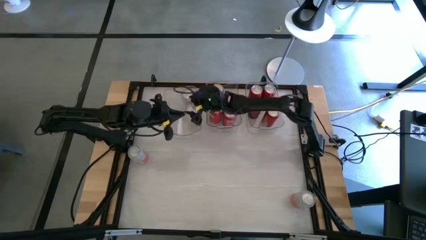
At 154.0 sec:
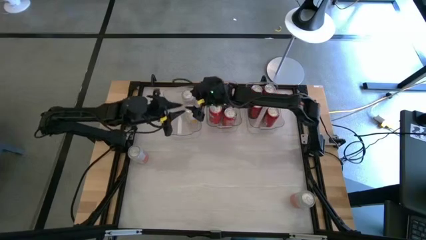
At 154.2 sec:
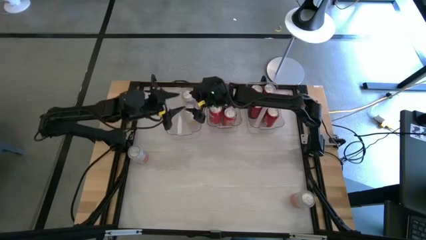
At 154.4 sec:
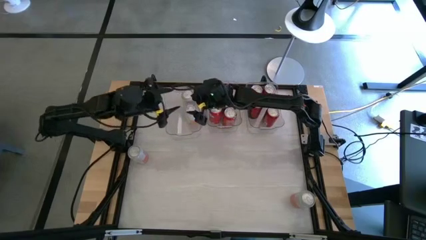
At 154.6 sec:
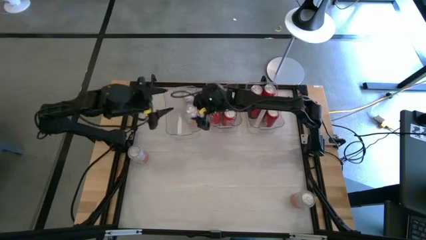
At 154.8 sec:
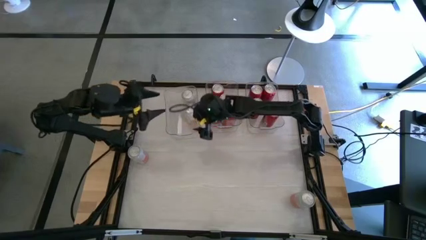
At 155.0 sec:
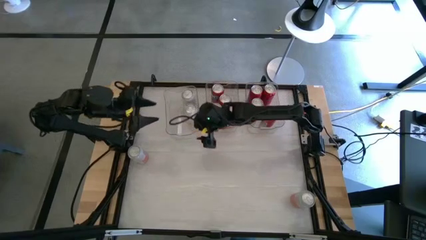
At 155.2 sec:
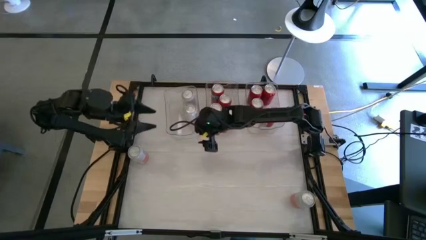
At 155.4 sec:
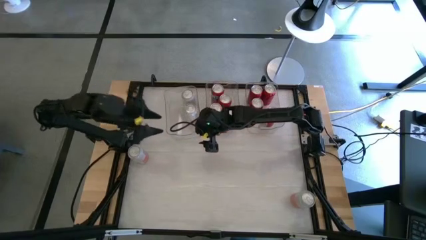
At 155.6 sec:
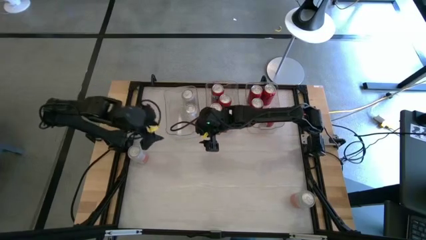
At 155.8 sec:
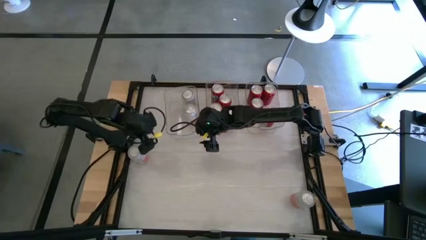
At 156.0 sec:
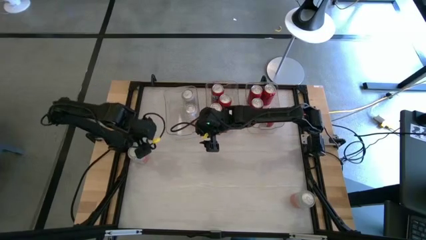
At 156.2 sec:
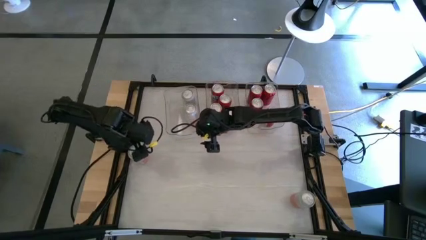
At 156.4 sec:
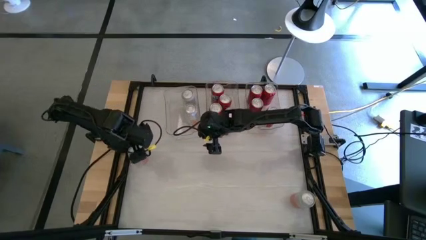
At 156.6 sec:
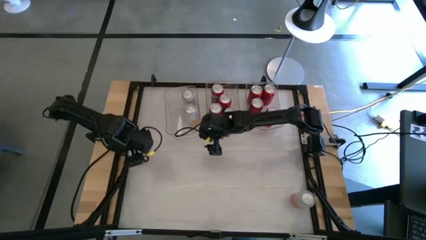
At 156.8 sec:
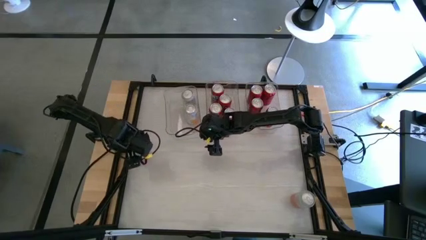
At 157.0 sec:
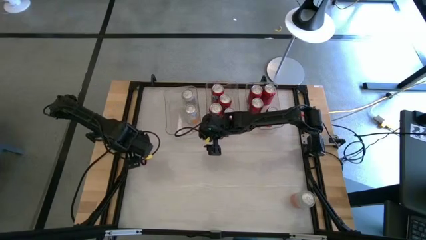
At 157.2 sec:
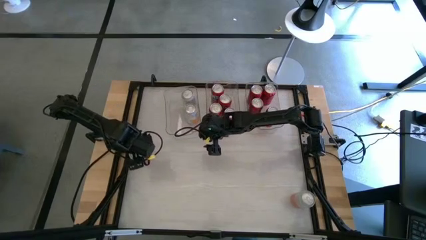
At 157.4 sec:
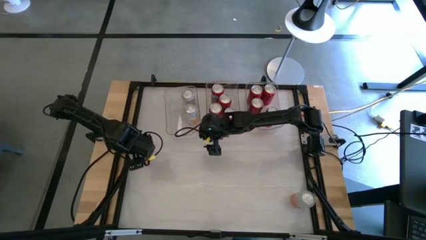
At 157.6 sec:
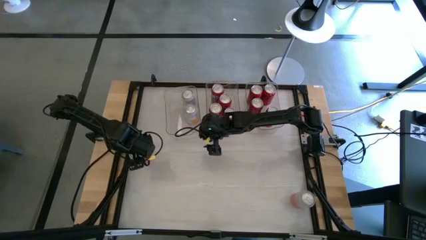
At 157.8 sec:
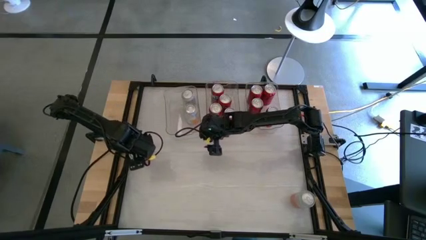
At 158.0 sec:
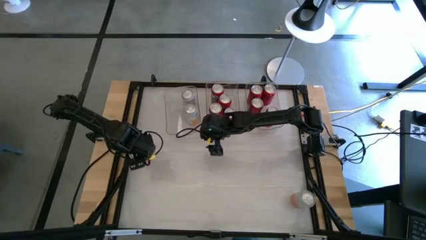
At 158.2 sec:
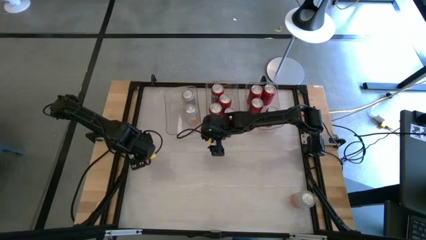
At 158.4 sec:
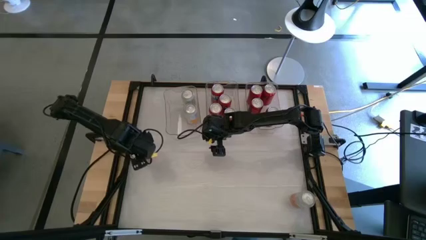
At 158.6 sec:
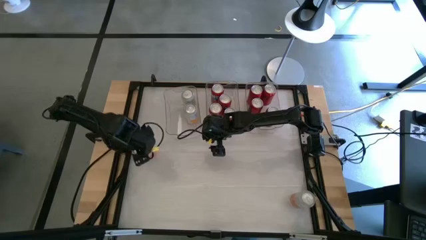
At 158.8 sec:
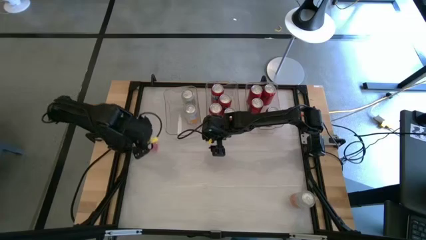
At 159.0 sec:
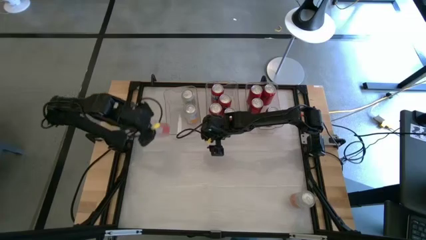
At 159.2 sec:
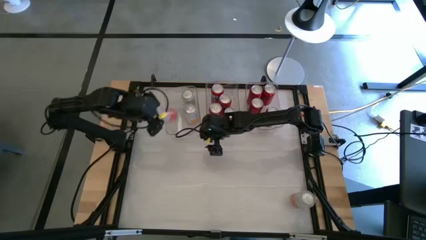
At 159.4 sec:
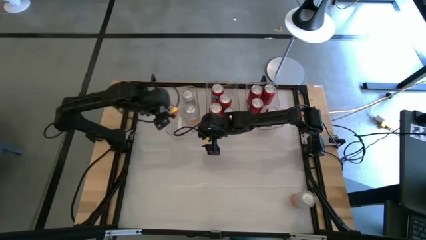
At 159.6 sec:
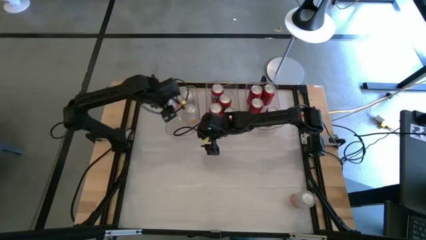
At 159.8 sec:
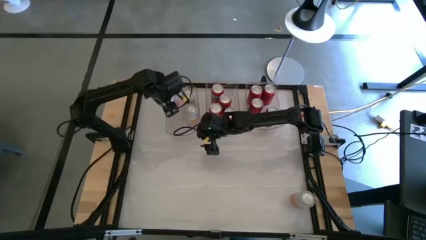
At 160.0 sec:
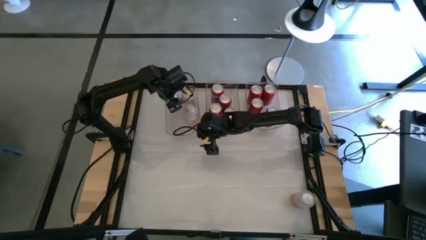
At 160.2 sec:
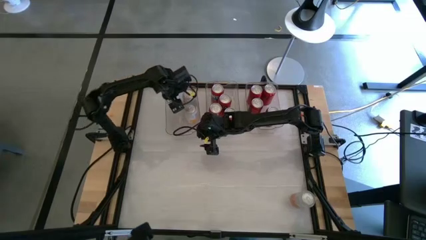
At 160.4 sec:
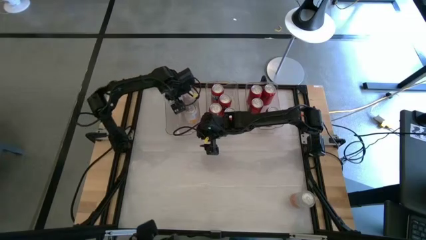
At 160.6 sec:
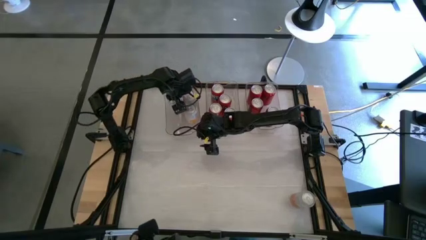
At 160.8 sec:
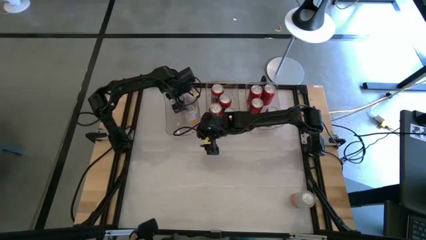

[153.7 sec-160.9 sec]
Task: Sort soda cans
Put the left pink white soda can into the left transparent bin

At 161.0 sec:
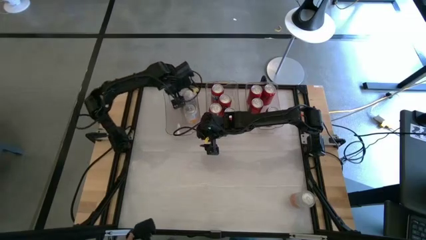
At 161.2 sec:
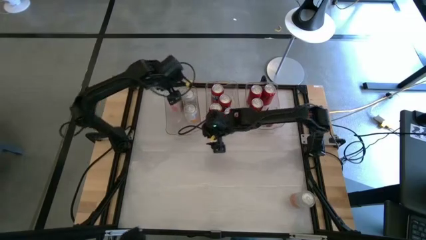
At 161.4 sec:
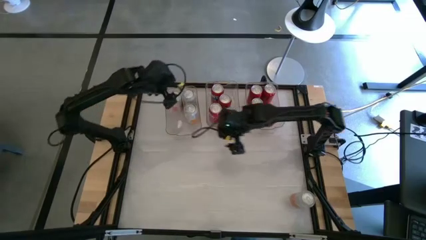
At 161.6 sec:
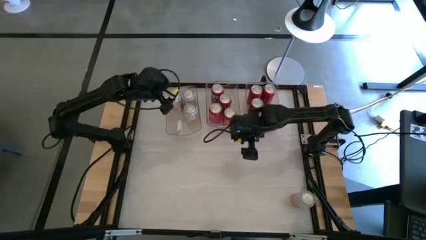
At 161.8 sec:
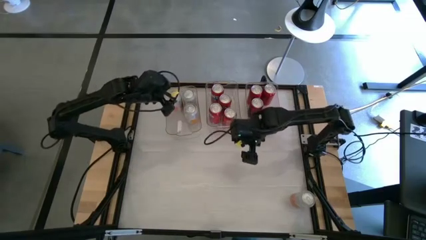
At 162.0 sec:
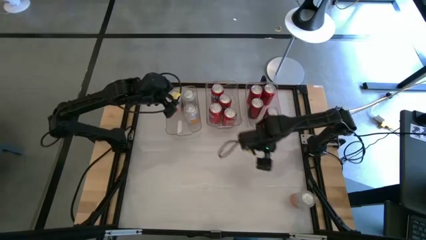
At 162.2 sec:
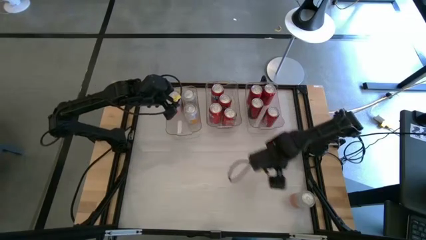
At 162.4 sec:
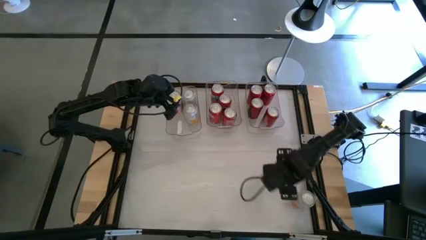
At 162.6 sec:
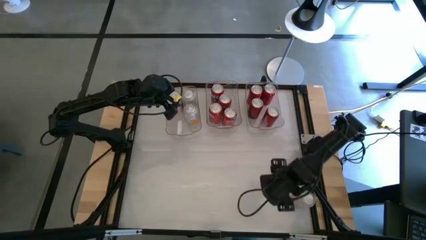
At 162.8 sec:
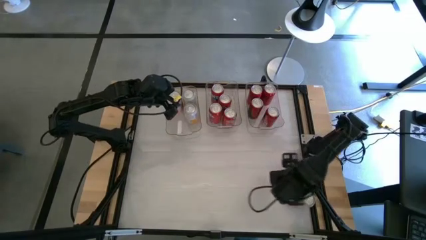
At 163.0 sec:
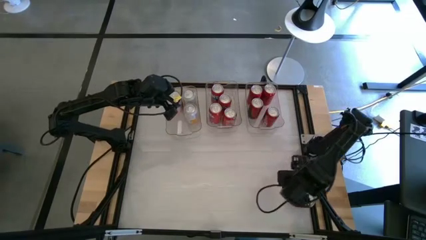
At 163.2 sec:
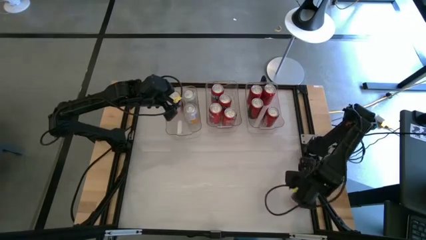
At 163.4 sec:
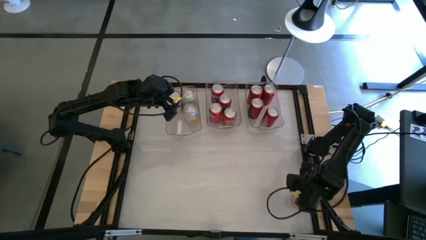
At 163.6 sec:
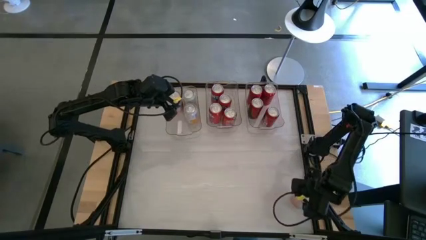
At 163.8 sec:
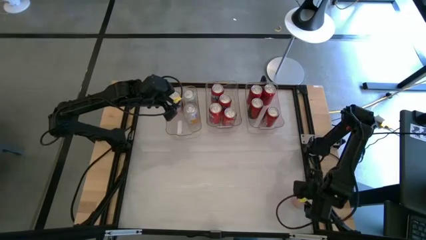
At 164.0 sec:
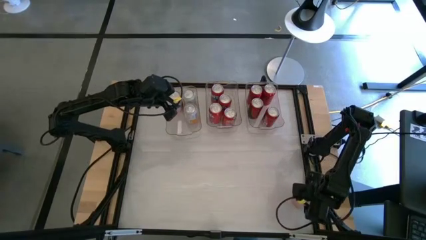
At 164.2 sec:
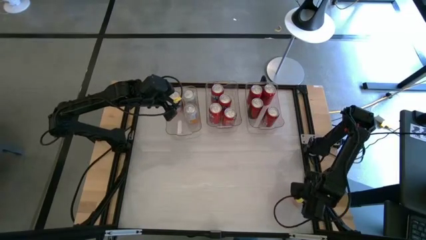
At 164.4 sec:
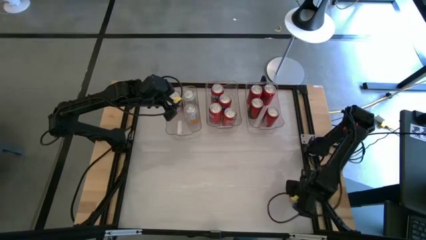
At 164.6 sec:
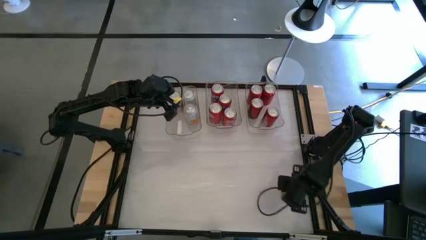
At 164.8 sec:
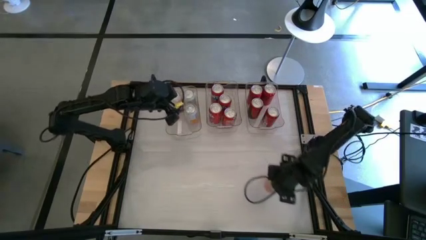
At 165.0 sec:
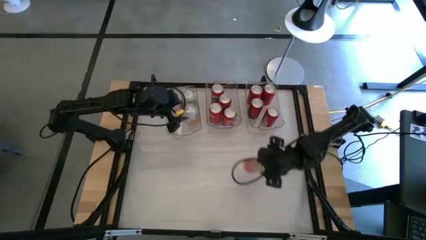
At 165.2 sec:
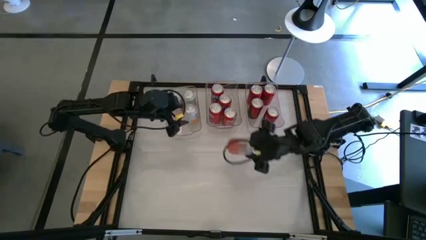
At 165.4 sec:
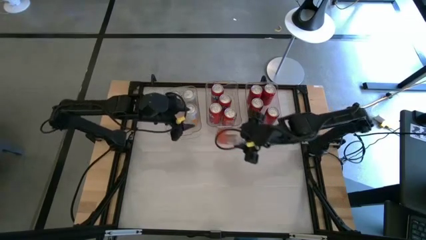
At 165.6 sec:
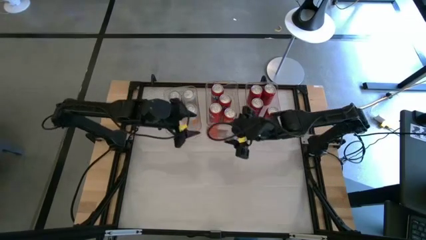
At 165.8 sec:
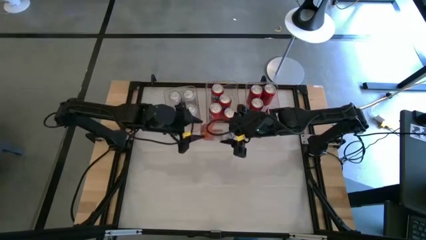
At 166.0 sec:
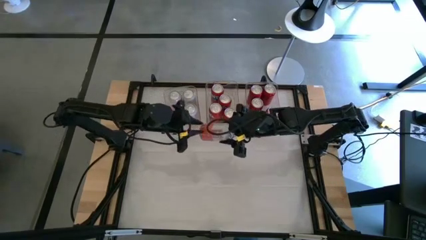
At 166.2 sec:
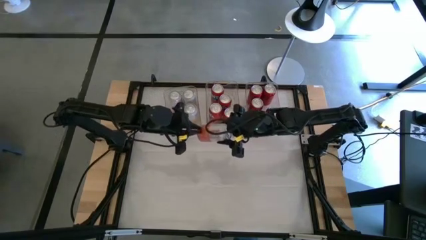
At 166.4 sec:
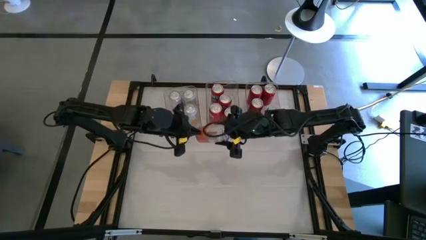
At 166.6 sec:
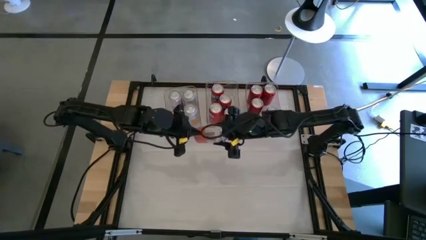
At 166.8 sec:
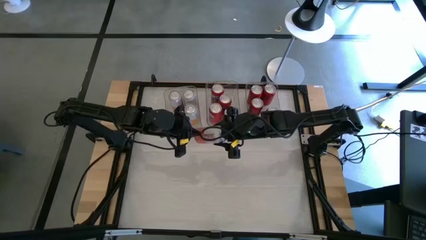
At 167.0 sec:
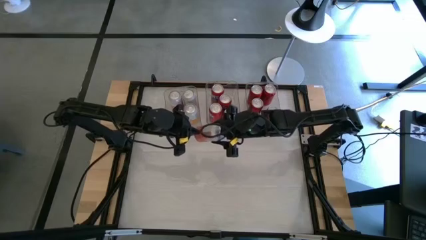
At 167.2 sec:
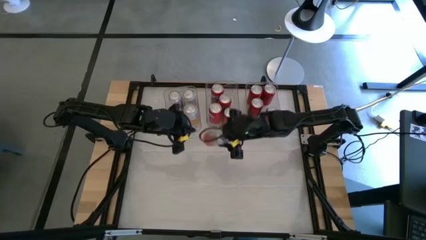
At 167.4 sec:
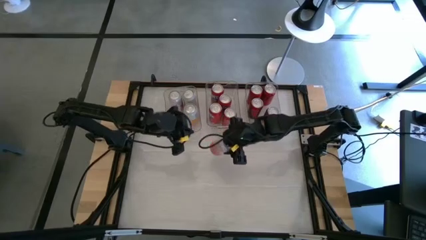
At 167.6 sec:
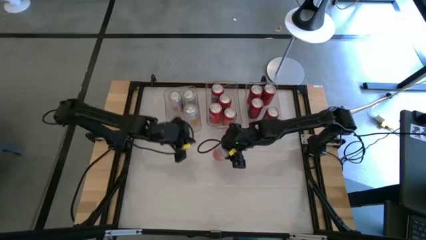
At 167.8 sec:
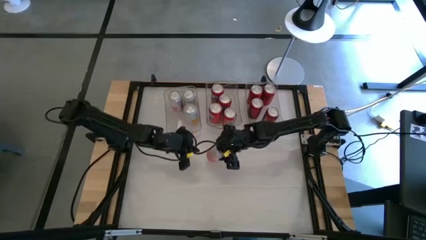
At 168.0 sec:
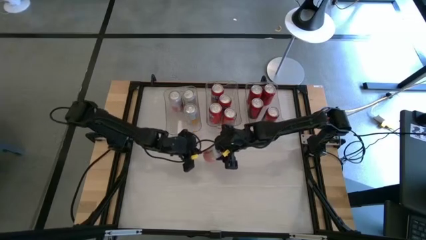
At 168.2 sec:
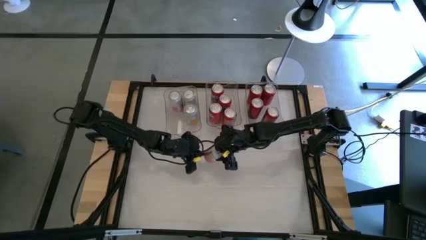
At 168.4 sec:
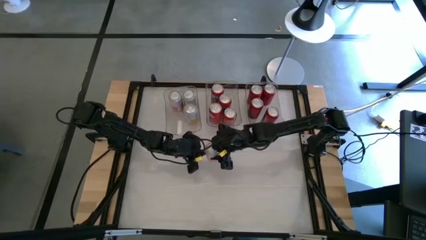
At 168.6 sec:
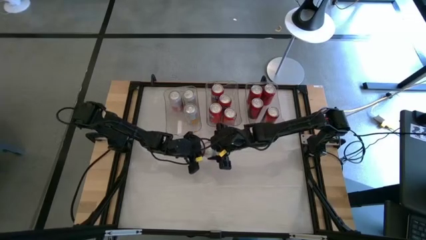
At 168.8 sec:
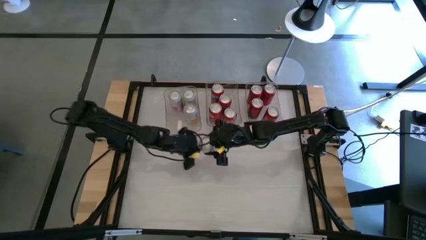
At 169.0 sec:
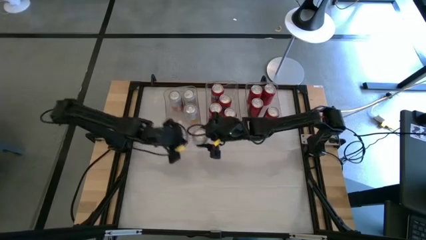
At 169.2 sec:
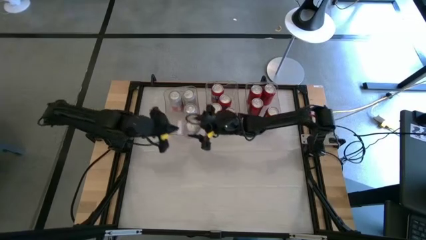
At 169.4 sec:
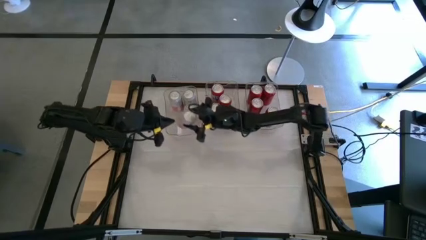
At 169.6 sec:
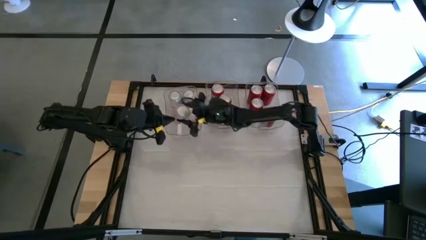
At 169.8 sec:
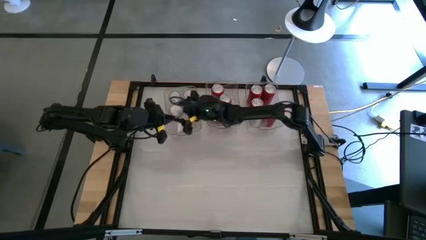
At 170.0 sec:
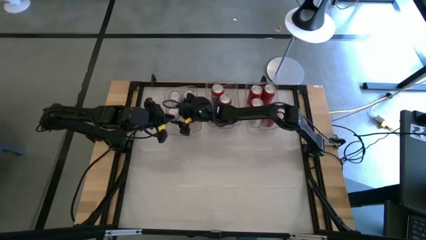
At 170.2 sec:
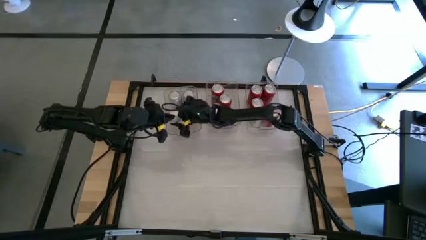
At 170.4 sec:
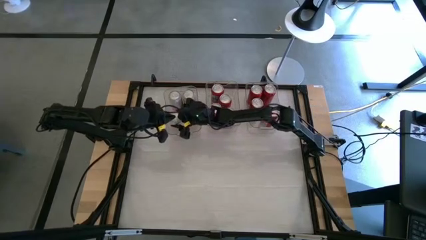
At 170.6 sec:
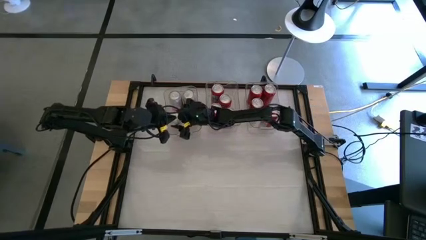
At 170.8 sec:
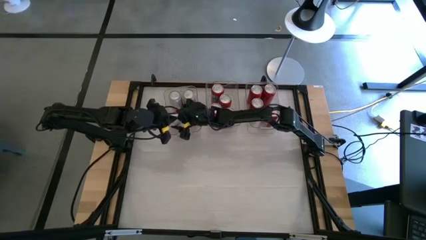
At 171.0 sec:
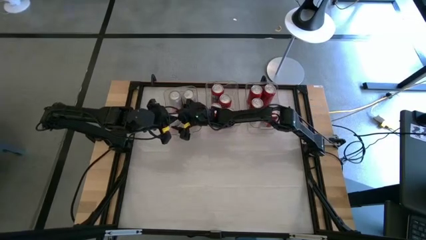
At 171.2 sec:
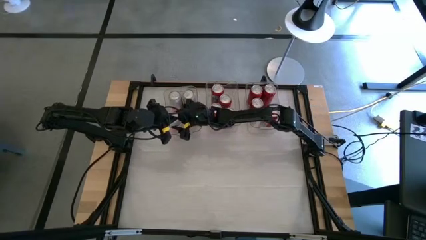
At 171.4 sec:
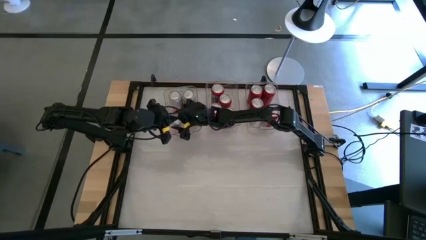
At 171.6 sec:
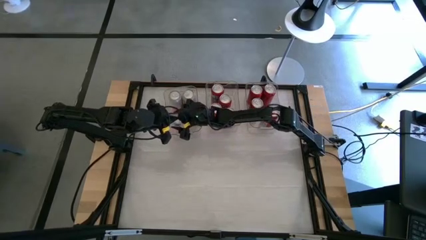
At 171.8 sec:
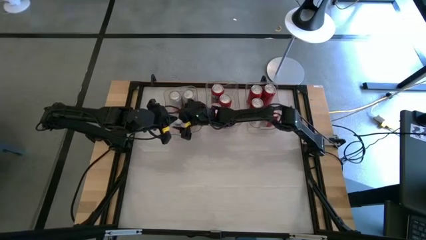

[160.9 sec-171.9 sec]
Put the pink white soda can into the left transparent bin
